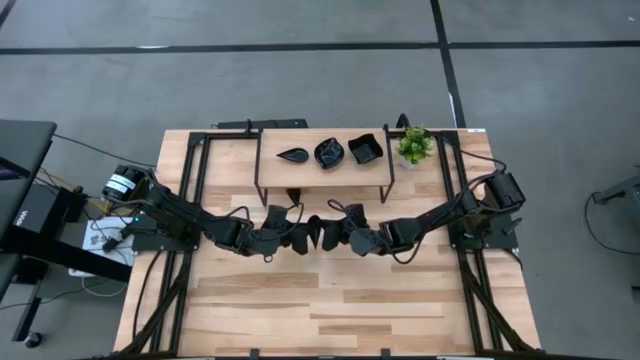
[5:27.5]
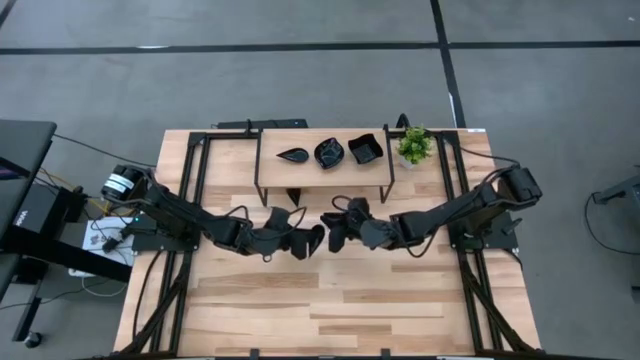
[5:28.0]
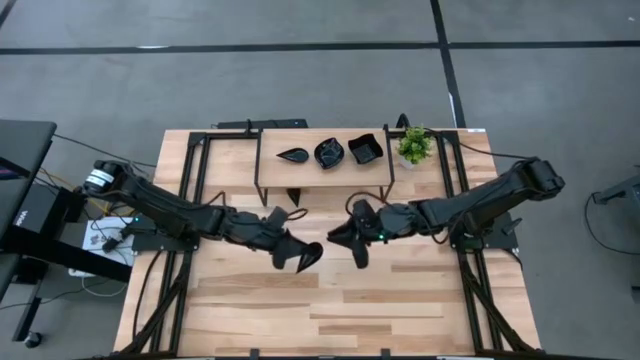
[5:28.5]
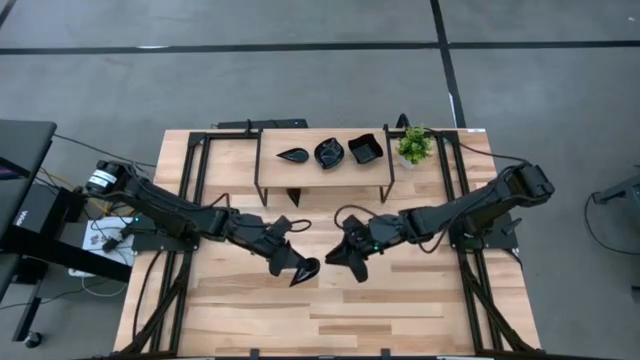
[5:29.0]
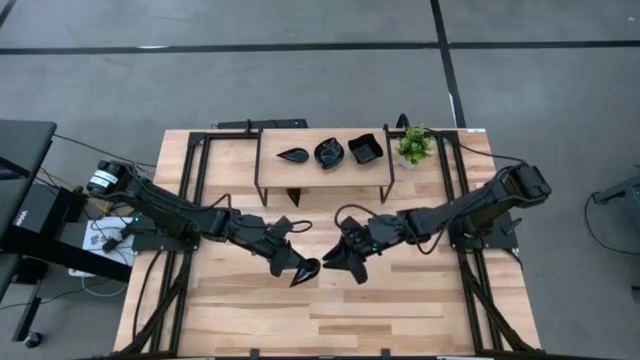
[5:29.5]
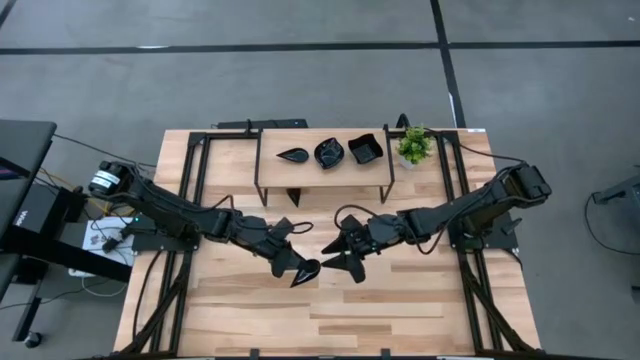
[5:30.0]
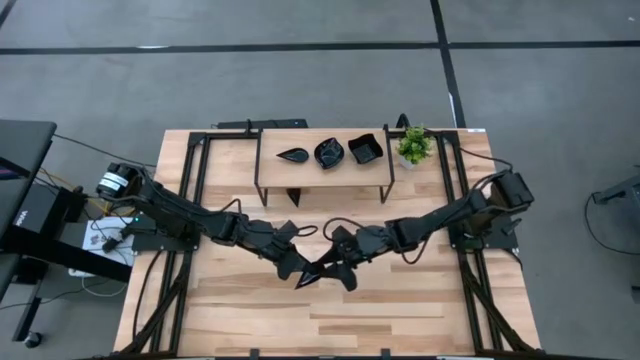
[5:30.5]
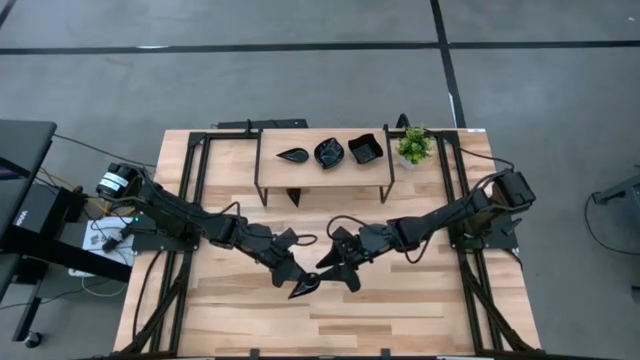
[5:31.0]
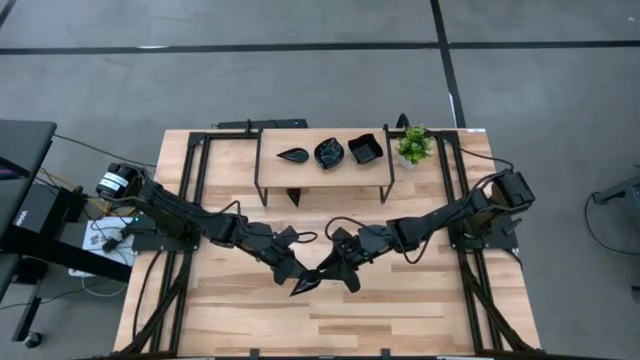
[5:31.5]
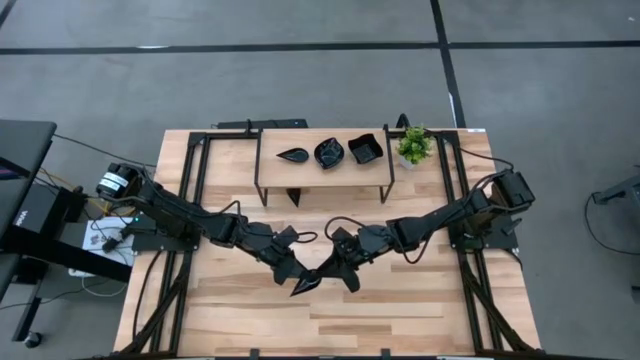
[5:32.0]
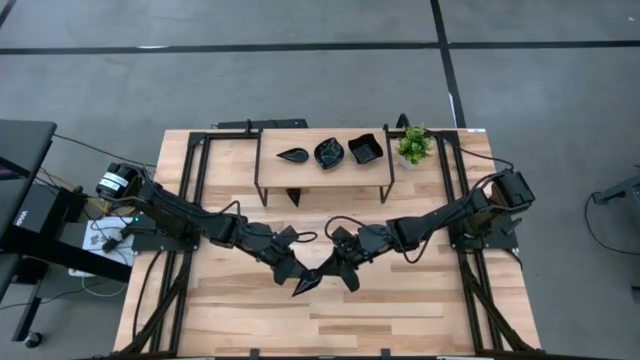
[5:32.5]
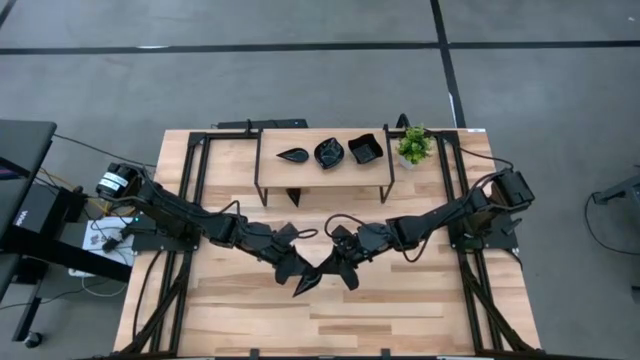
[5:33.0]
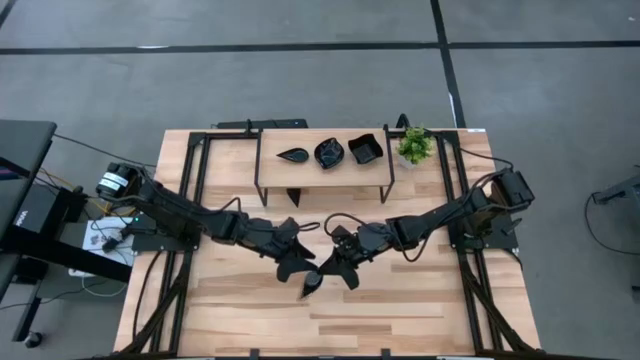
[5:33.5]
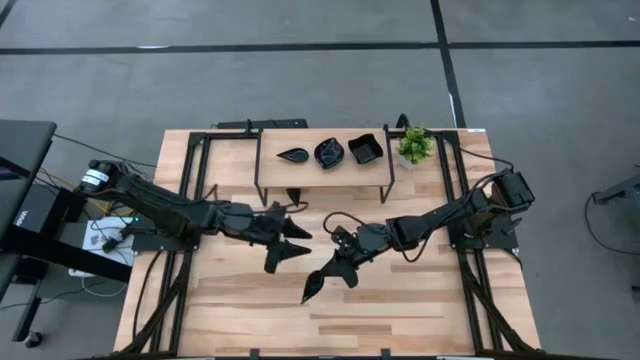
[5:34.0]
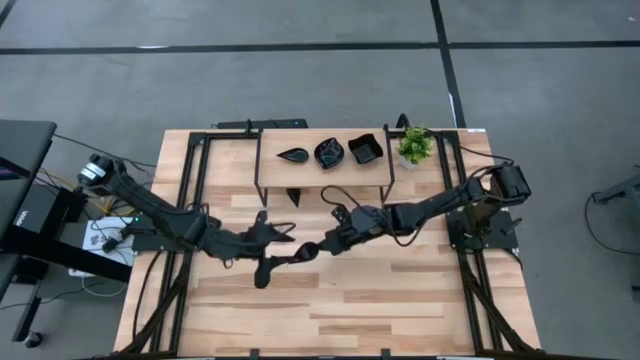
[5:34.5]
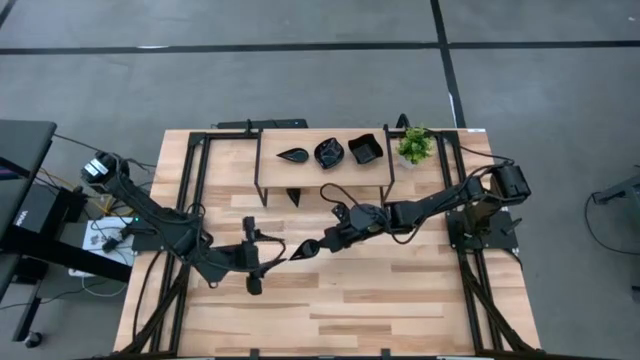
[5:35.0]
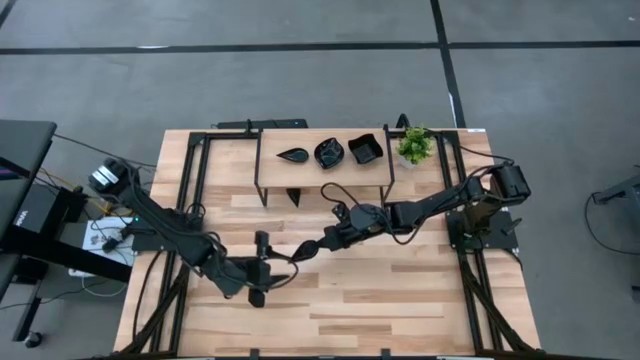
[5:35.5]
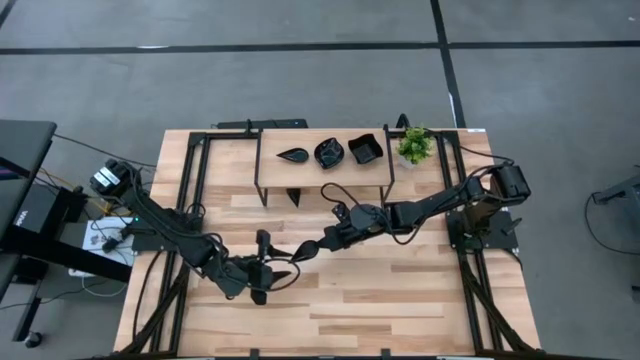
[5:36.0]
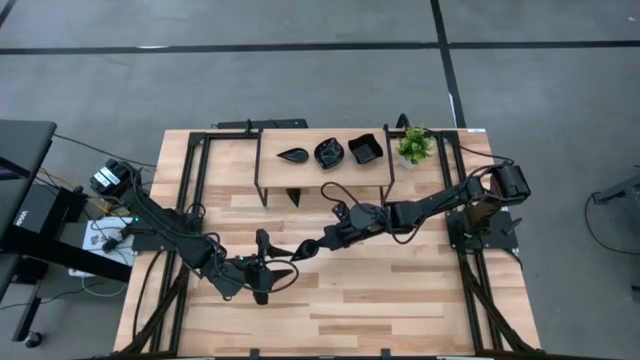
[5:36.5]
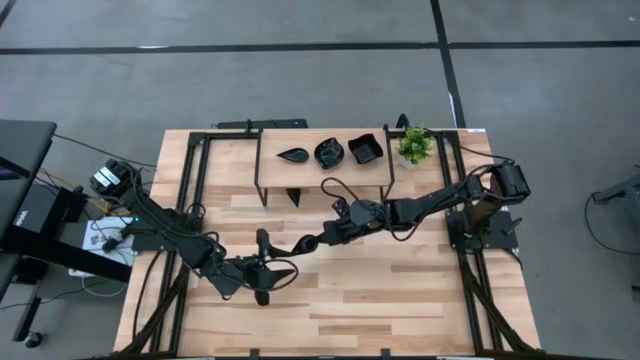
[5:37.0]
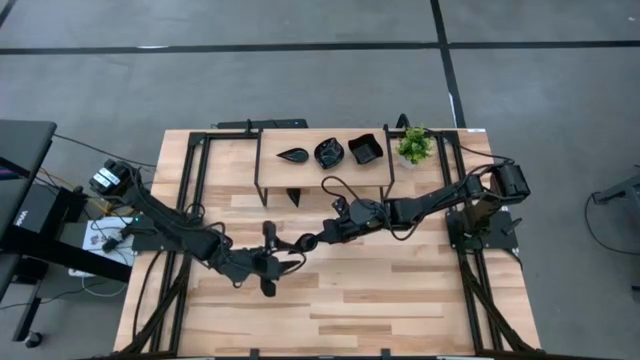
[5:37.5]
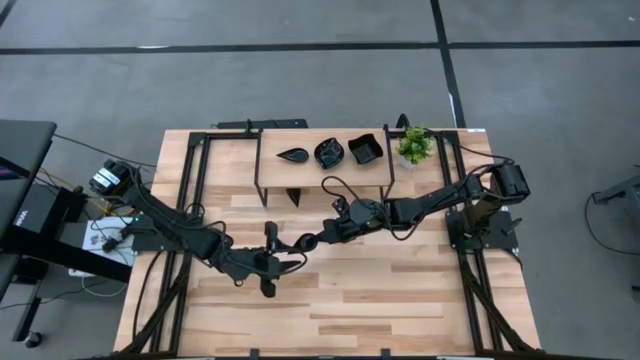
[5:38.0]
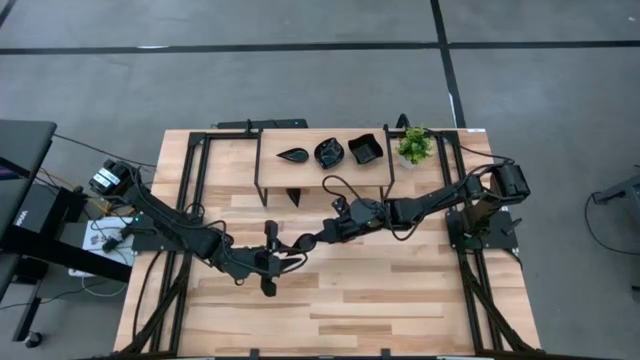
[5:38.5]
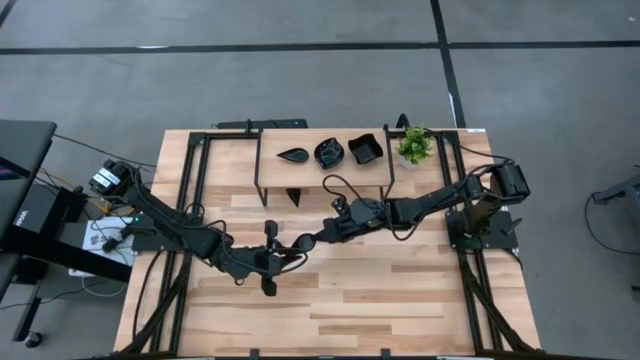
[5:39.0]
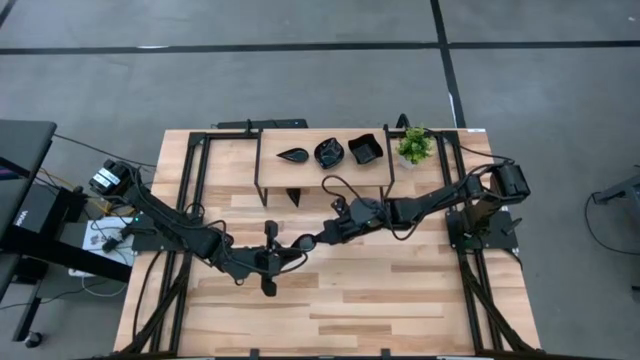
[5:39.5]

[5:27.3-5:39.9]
Task: Pick & Place Mini shaped plates
Stack the black drop shaped plate on the black drop shaped plate on the shelf

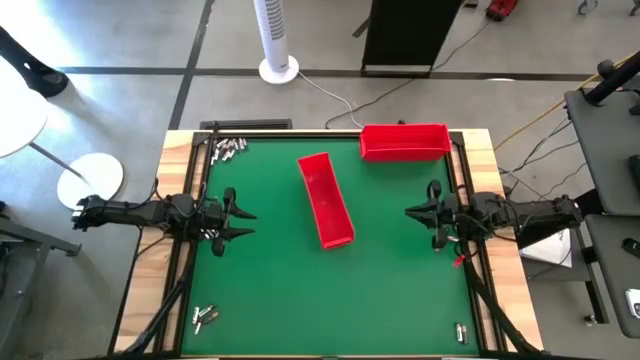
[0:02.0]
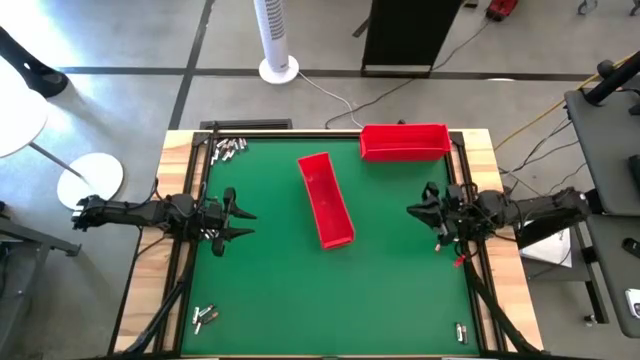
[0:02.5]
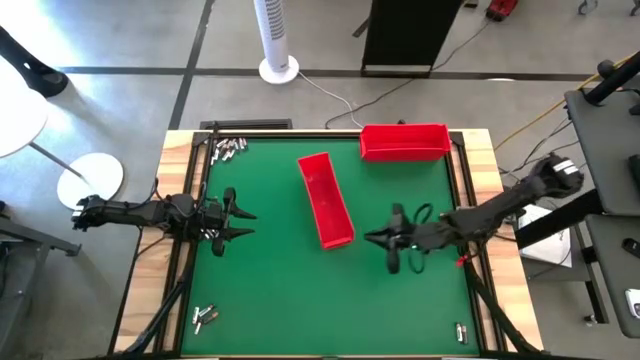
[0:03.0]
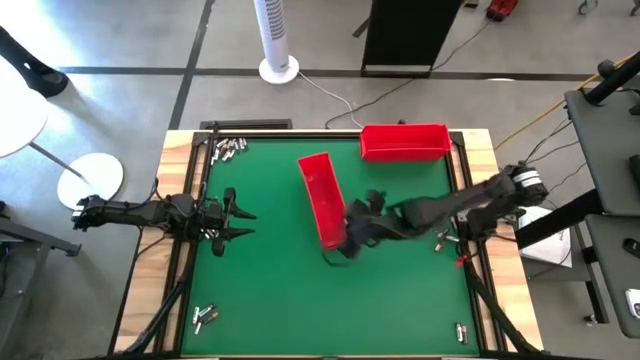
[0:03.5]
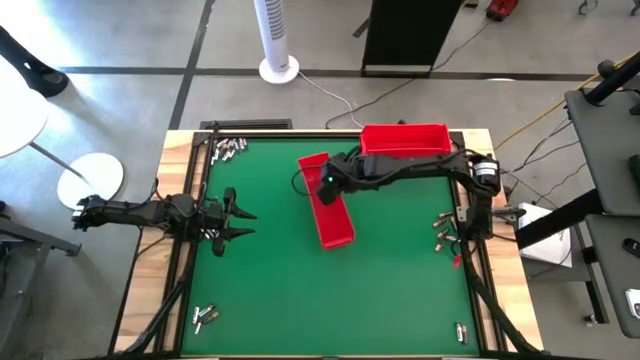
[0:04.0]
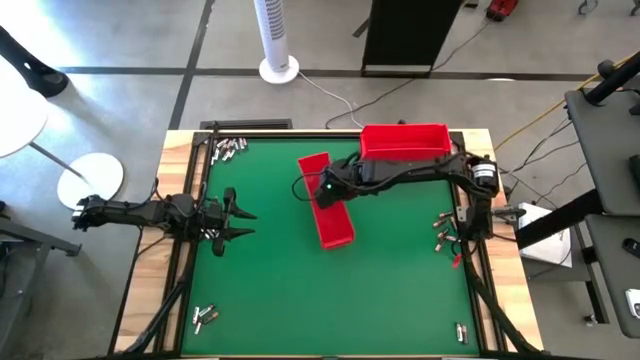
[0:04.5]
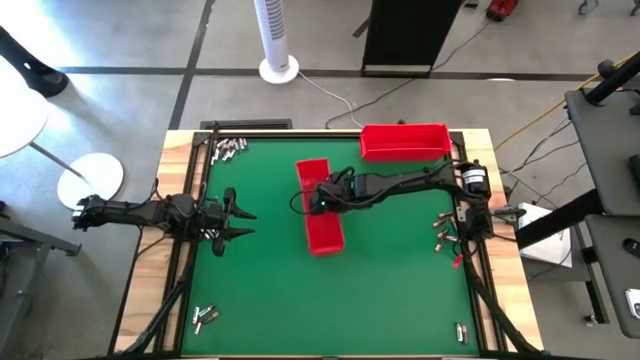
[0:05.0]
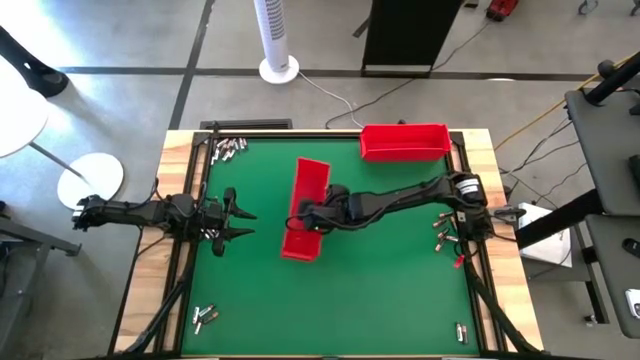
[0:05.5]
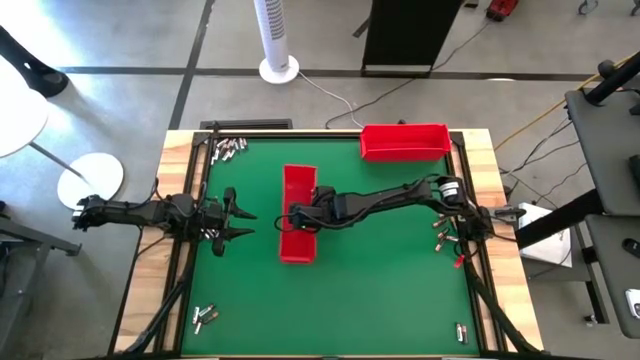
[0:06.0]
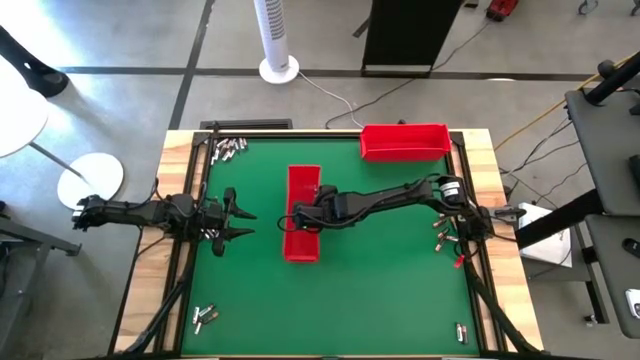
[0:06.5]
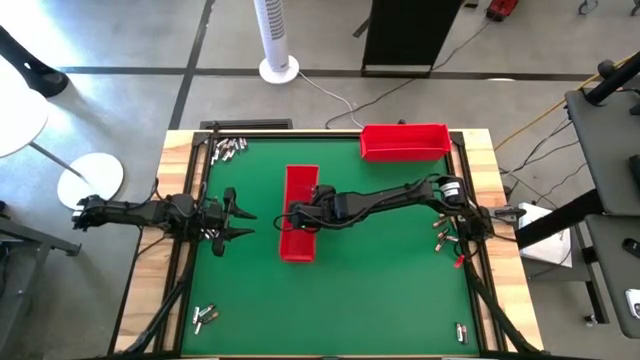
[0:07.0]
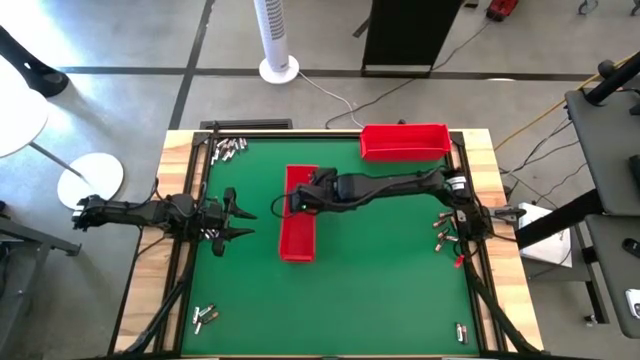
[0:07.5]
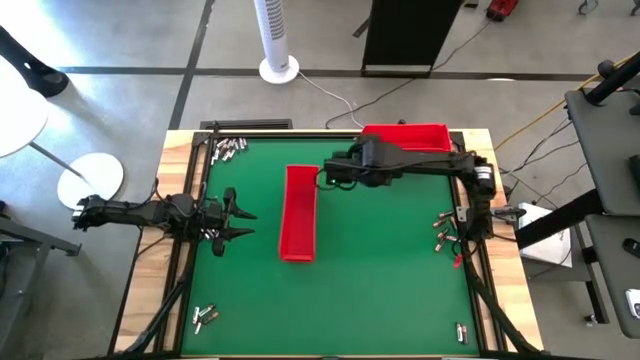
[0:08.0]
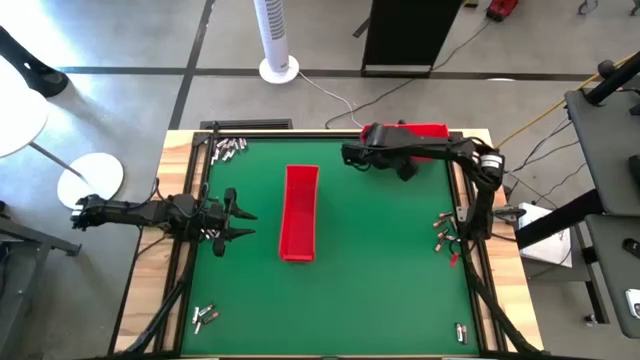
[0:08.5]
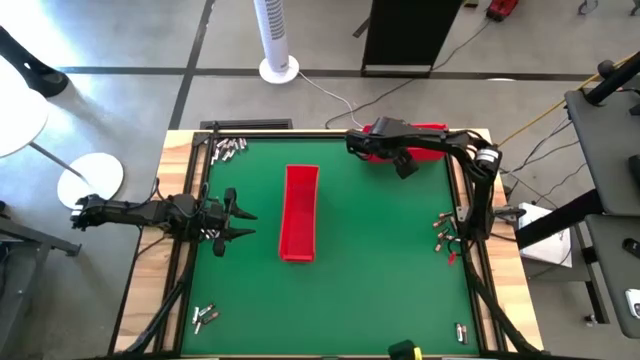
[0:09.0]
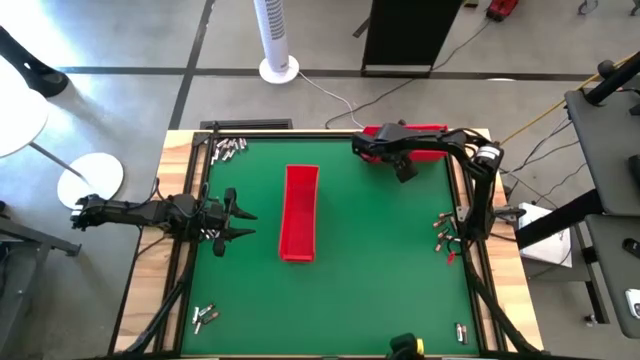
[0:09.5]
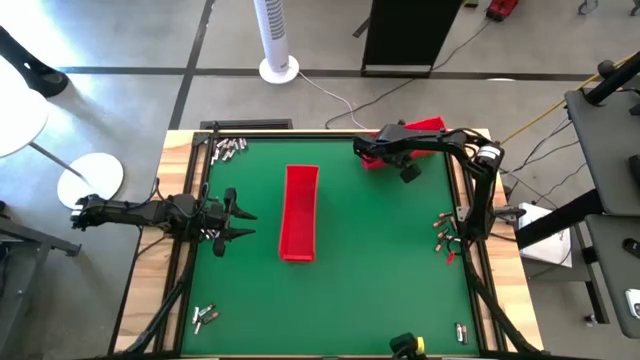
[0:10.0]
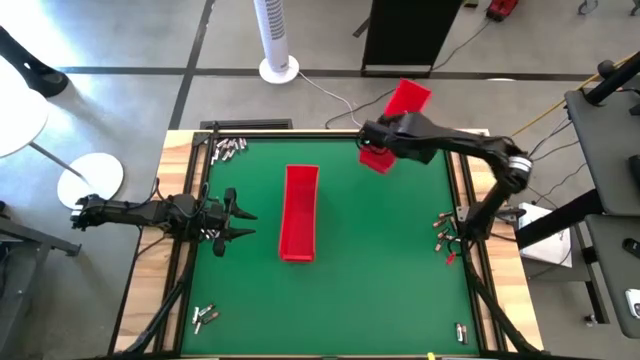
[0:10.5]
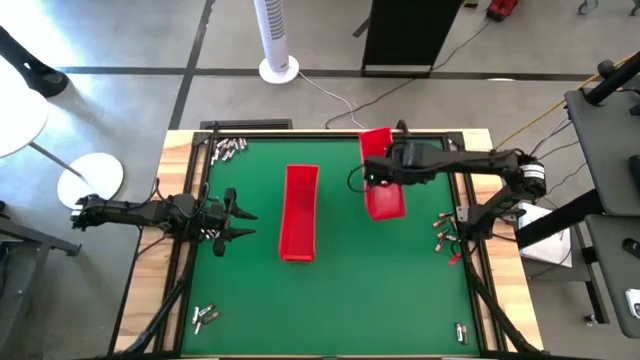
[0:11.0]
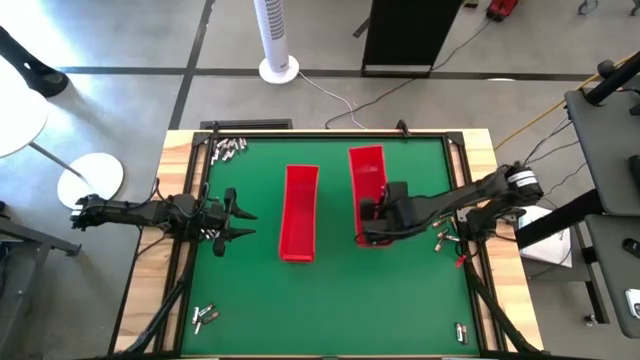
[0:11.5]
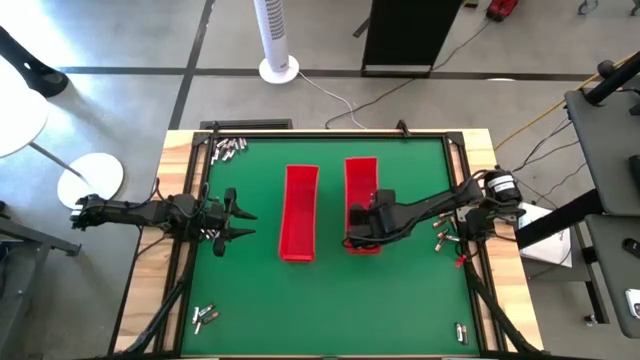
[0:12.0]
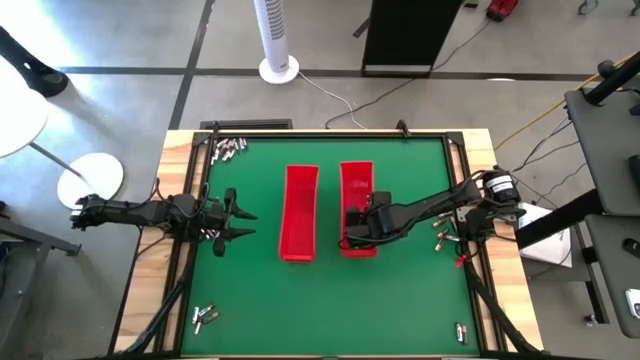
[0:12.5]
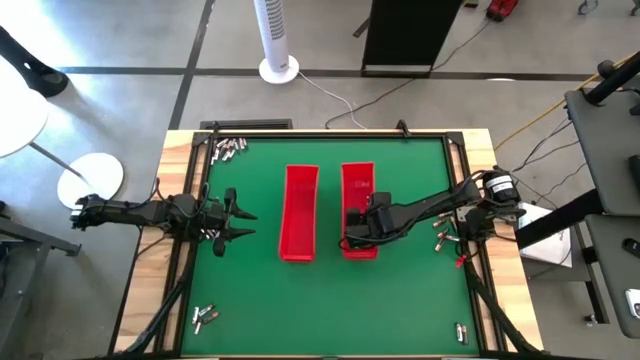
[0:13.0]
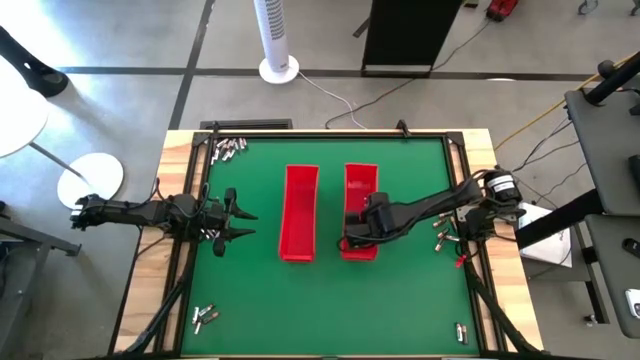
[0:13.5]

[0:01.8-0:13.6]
Task: Sort batteries
Move the bins to the center of the table
